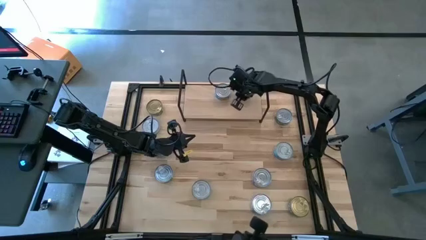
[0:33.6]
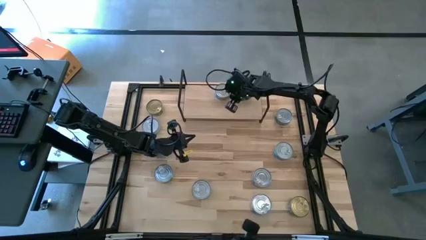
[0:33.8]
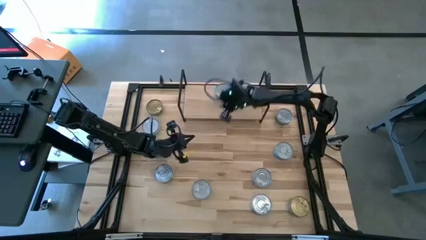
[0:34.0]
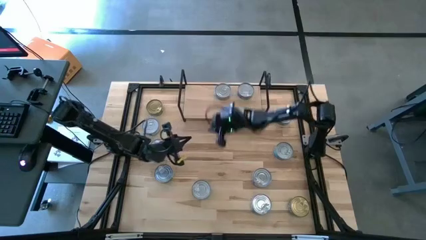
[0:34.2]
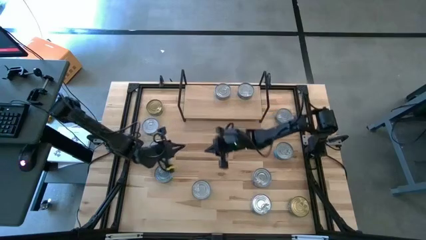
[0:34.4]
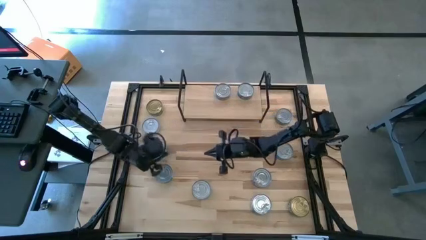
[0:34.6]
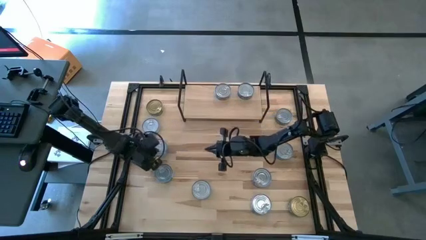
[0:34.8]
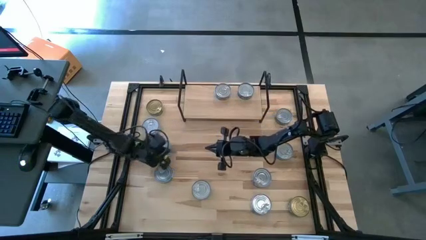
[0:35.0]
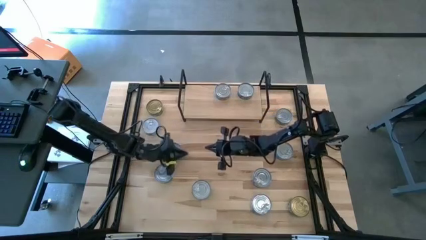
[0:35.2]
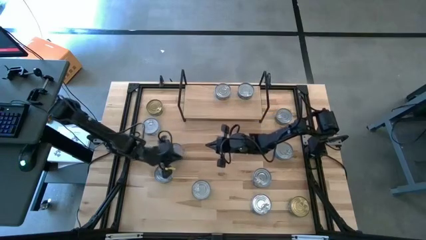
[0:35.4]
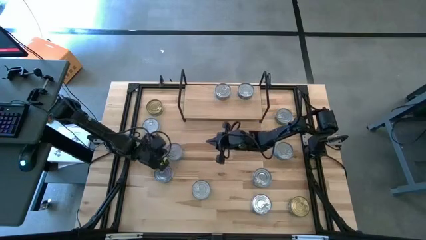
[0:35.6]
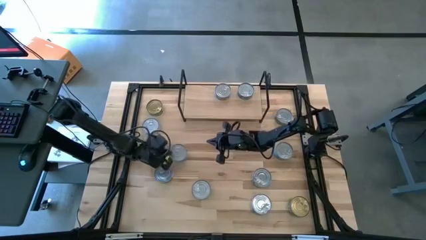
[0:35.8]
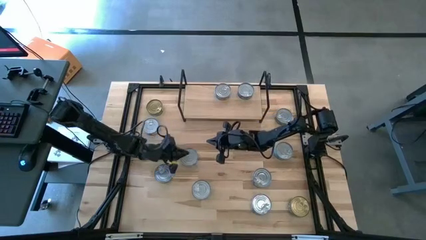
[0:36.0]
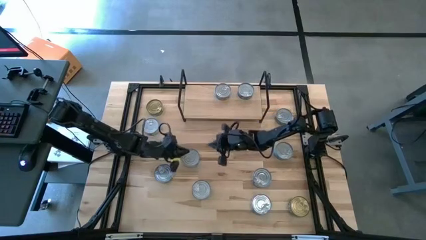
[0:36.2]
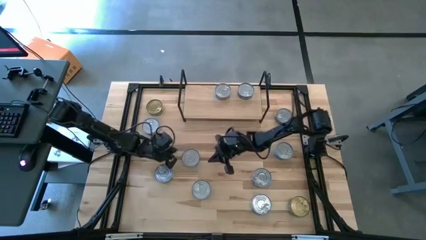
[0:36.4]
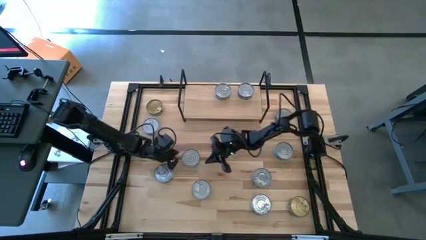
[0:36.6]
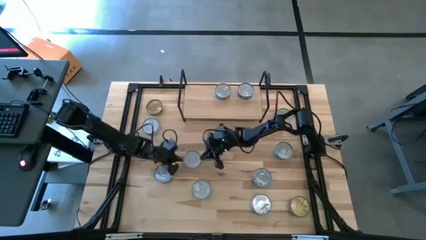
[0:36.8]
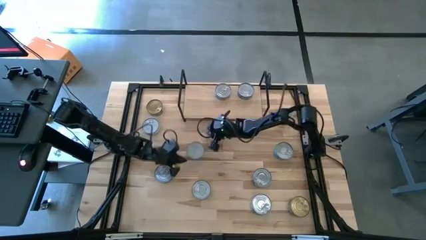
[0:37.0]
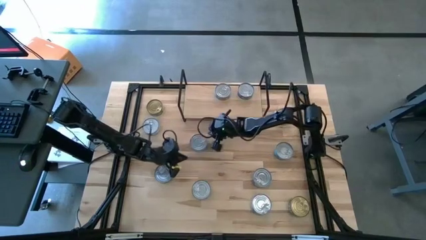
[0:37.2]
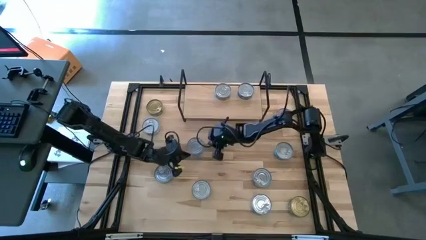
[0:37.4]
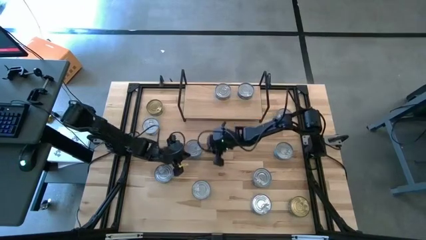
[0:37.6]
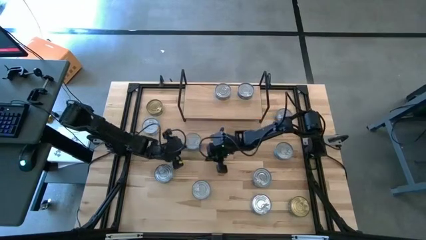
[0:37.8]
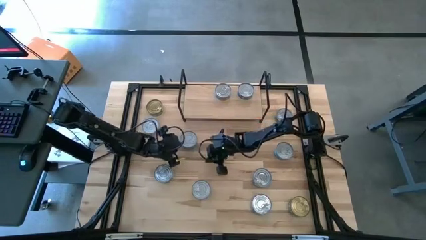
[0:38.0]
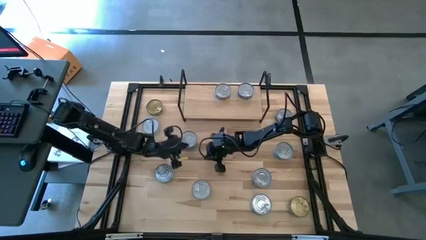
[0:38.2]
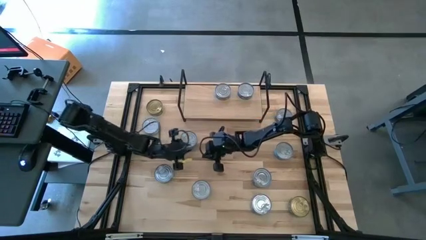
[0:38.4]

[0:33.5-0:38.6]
Task: Stack canned seafood by type on shelf
Adjust the light blue tuna can

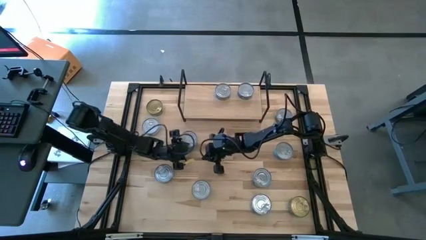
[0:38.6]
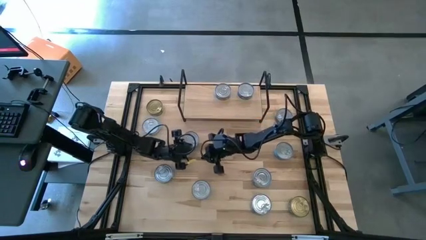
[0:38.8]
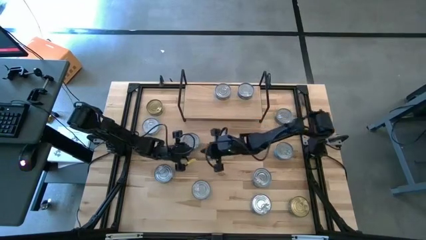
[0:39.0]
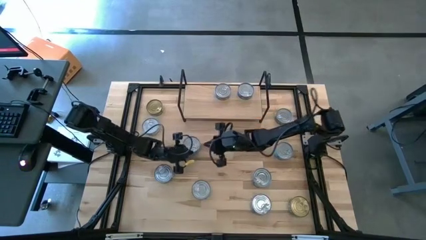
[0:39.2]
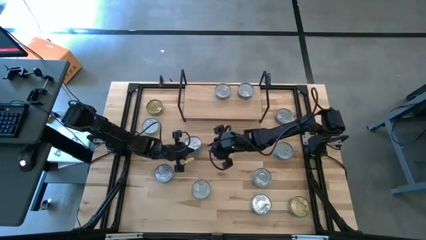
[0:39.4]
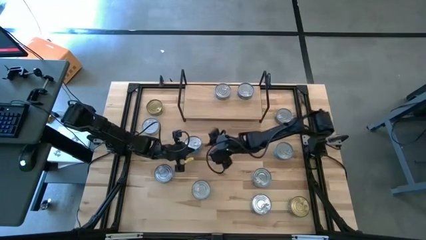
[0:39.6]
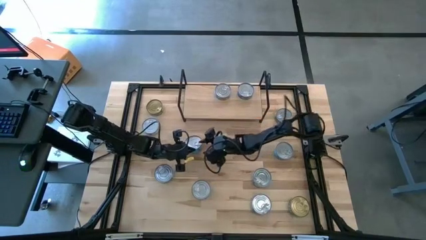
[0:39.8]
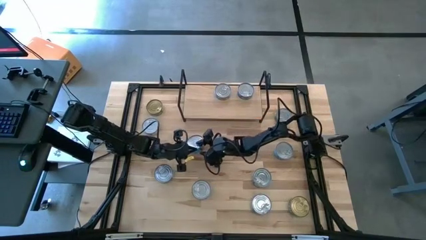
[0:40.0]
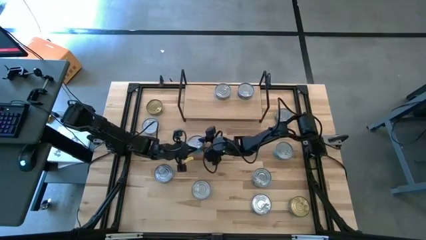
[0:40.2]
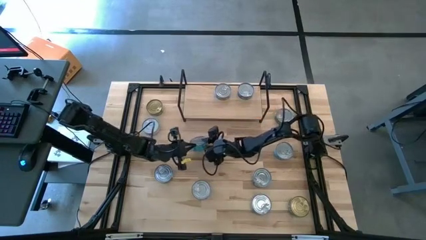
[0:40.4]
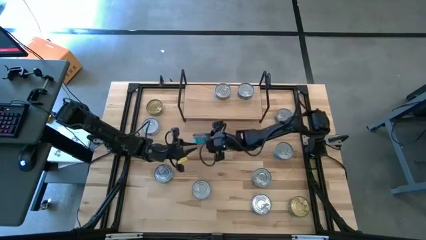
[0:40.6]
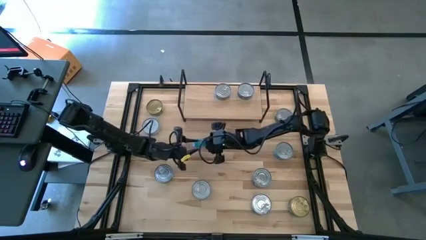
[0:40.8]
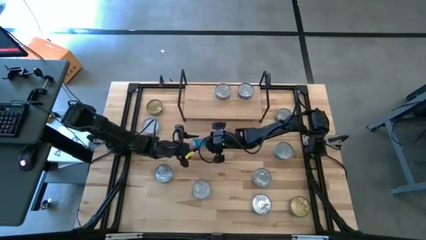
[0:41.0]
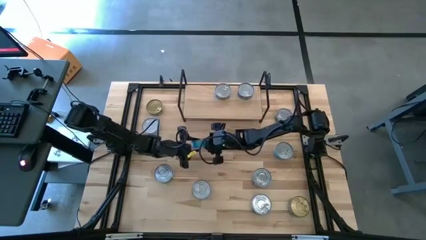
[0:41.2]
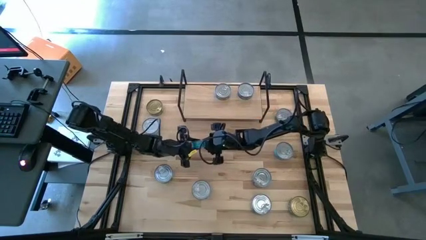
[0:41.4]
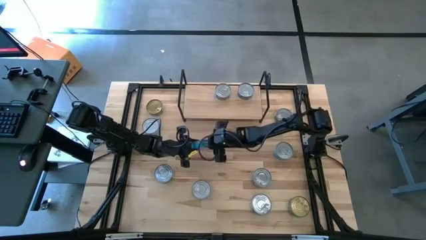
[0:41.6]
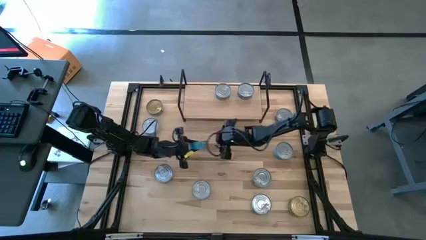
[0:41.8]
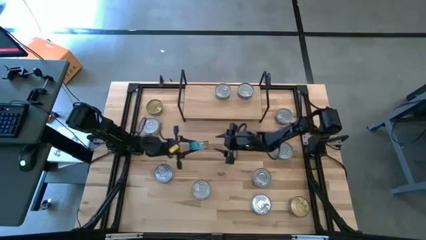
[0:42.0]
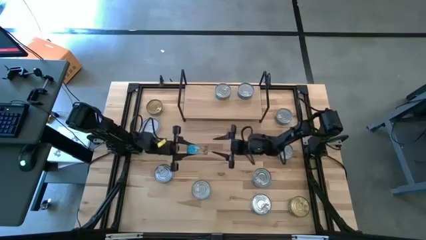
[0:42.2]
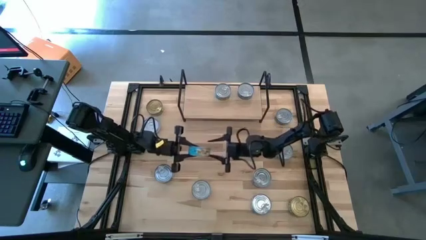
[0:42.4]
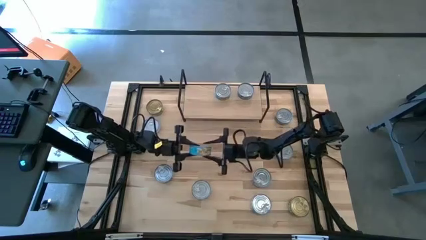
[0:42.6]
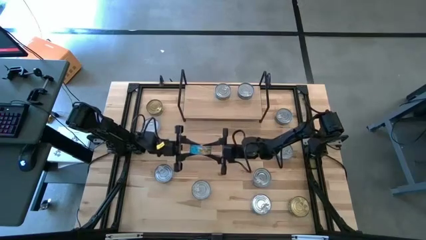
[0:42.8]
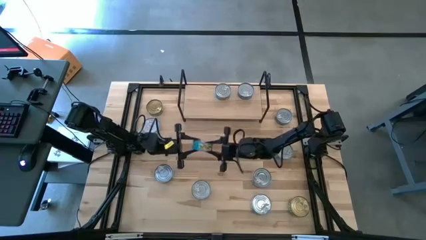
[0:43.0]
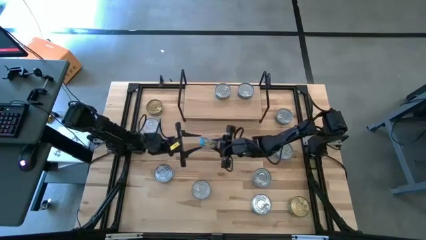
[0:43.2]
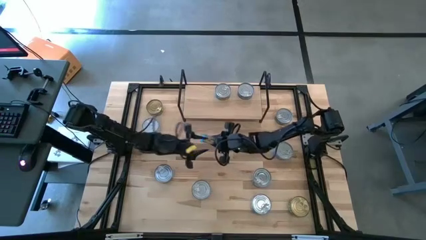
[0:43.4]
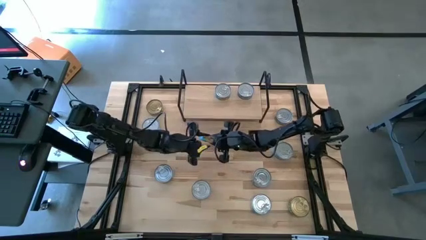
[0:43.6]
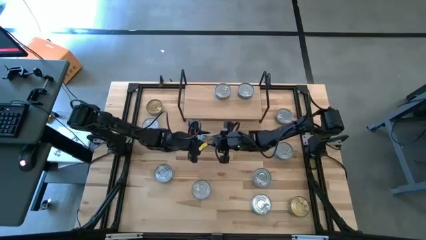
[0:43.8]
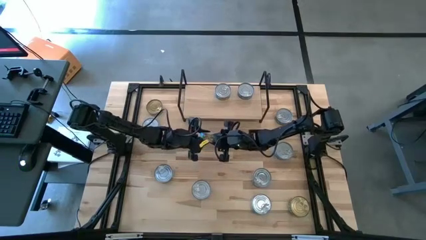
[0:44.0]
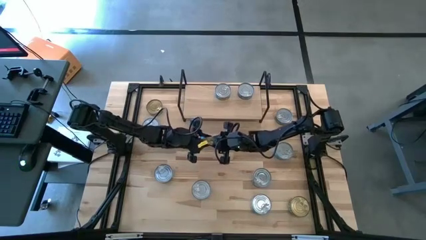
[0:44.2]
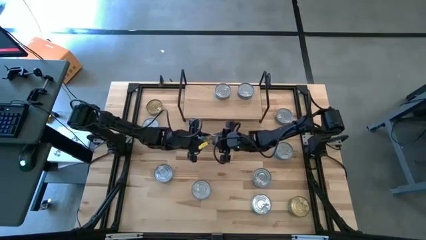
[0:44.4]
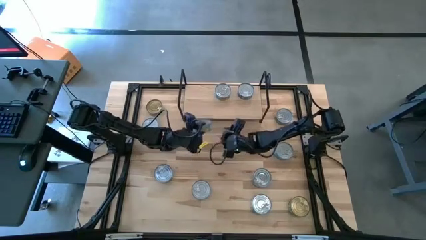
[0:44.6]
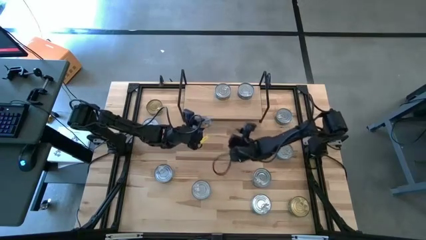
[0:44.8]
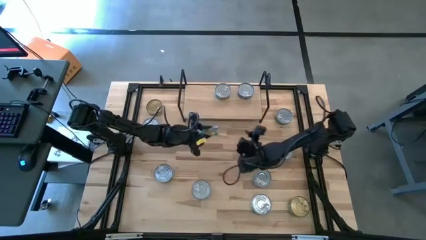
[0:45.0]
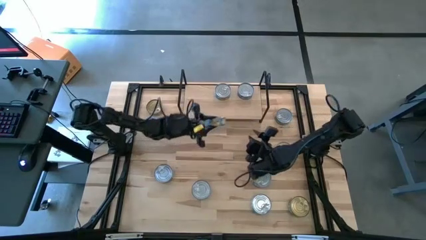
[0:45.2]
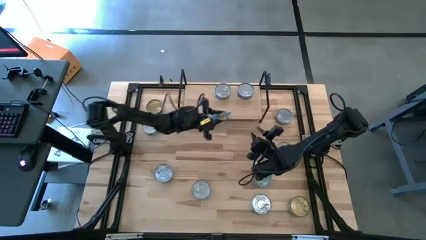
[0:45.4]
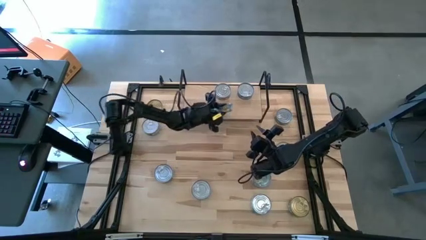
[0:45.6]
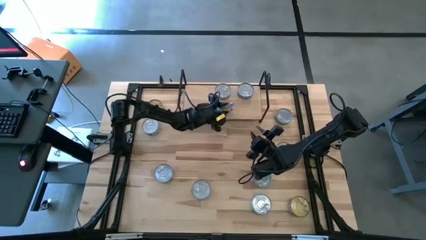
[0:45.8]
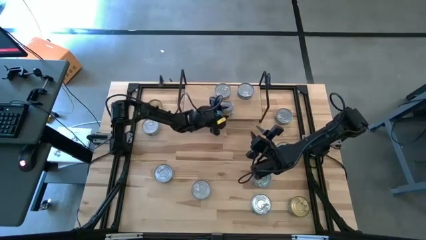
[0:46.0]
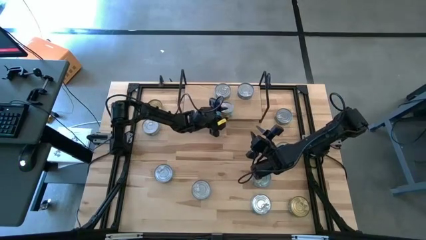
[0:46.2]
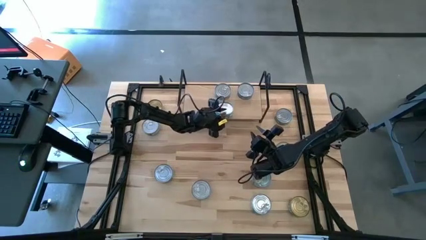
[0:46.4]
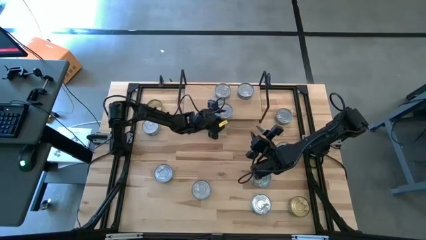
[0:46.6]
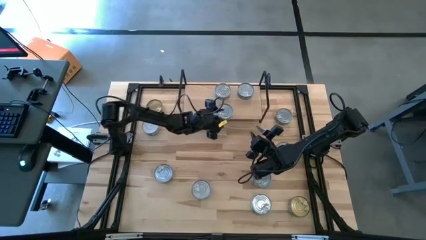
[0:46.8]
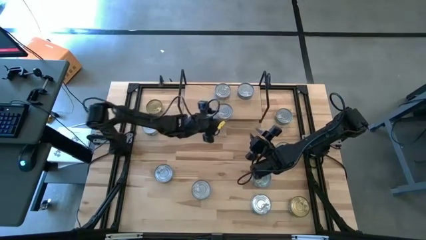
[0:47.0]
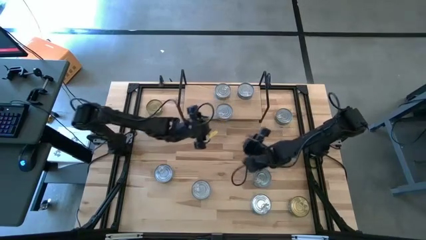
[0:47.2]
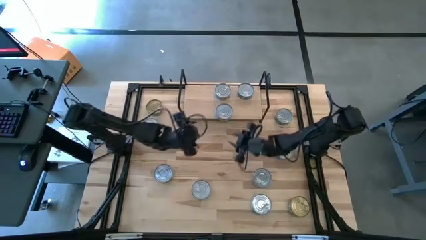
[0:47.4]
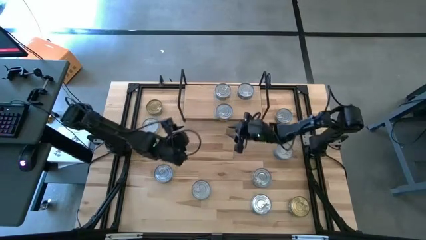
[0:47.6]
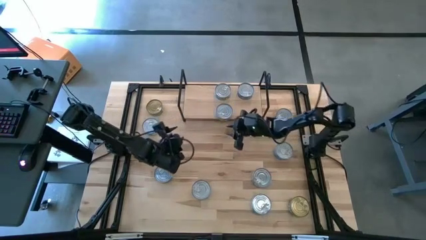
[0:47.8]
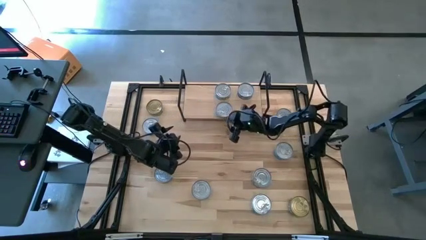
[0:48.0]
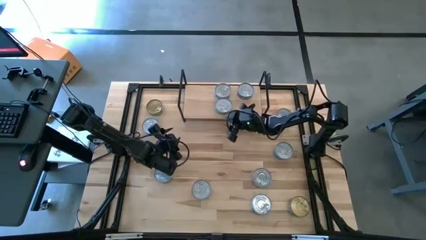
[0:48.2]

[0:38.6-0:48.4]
Put the light blue tuna can aligned with the other light blue tuna can on the shelf

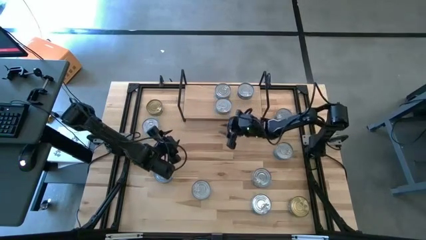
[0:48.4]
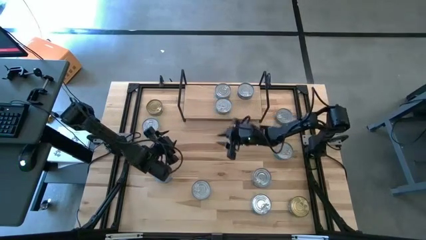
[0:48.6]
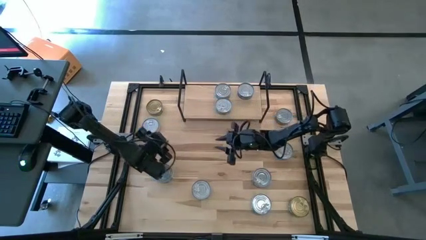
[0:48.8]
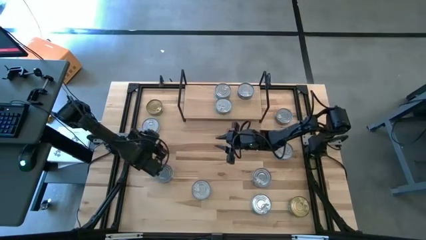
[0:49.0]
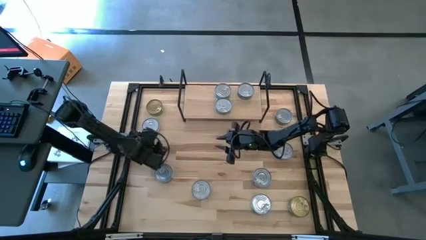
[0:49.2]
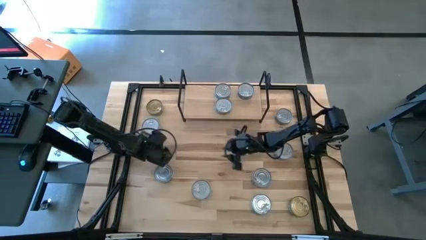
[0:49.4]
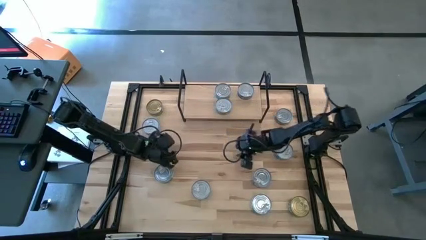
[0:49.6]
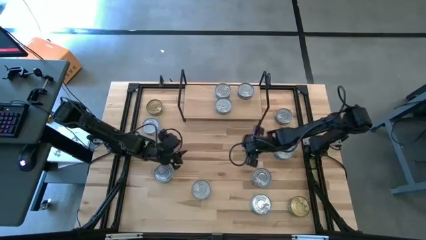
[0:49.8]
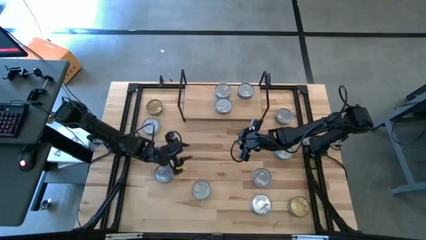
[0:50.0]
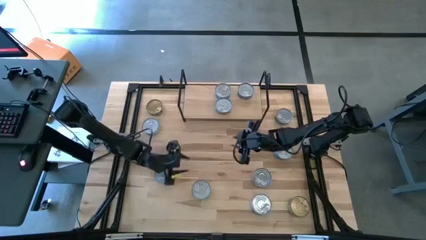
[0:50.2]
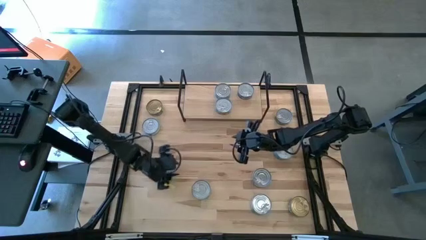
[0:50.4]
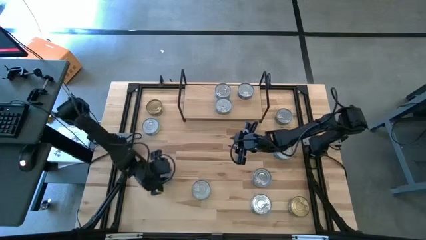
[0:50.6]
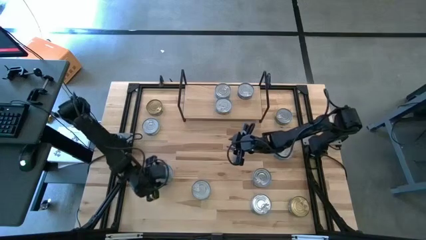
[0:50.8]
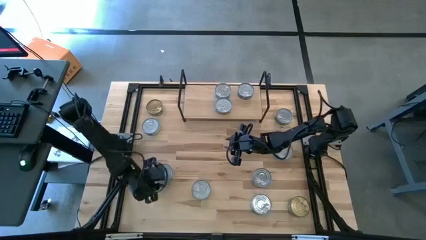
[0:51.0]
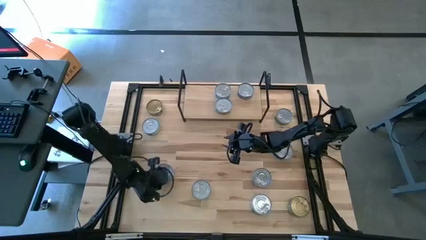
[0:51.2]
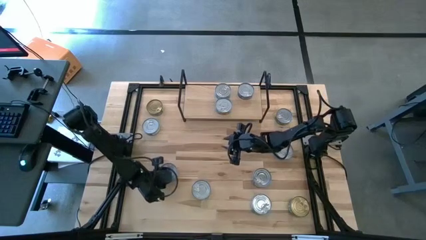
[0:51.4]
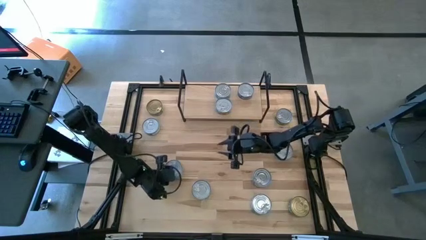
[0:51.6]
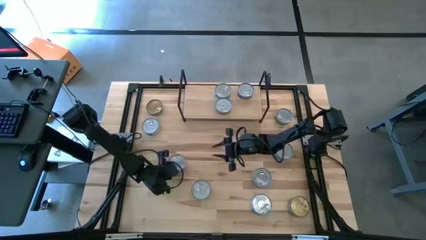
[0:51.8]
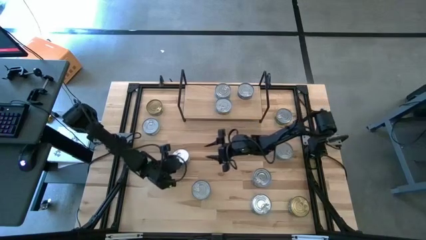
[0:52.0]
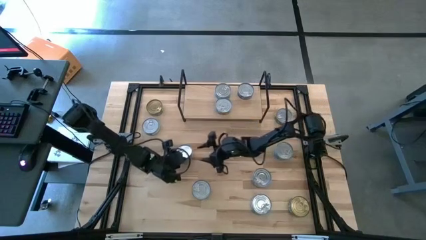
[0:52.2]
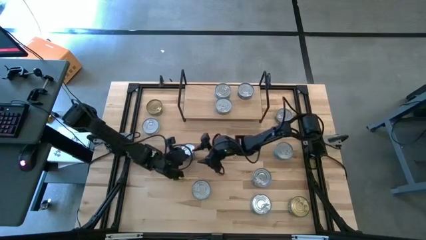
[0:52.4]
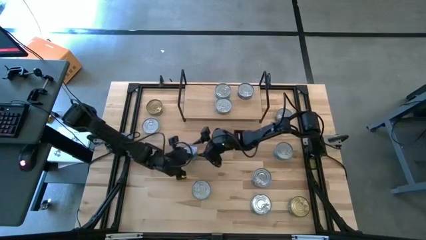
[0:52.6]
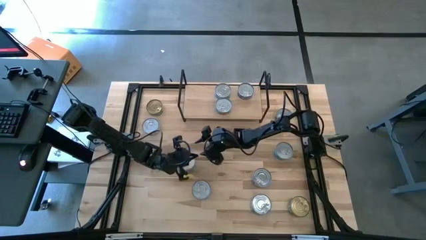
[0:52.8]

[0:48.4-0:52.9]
Put the green tuna can on the shelf
